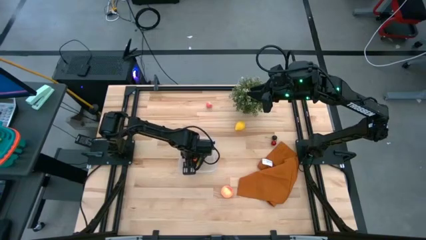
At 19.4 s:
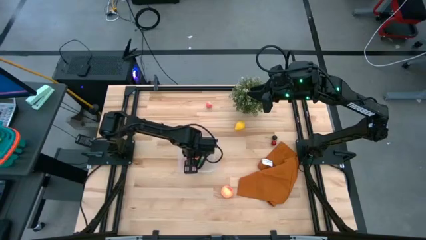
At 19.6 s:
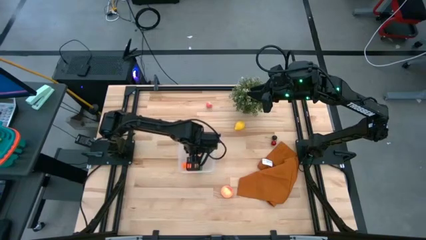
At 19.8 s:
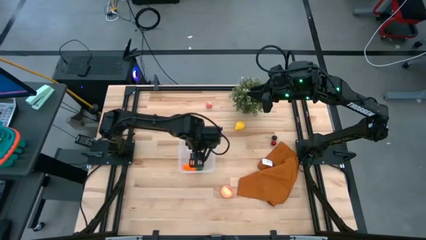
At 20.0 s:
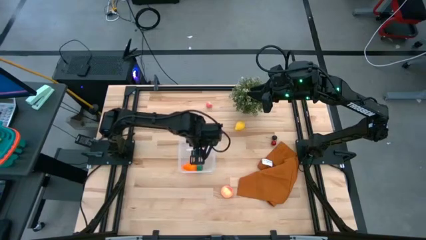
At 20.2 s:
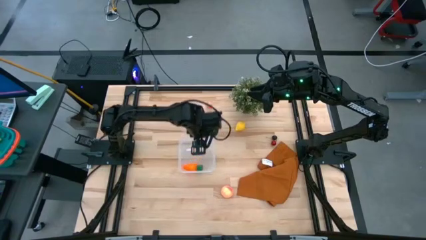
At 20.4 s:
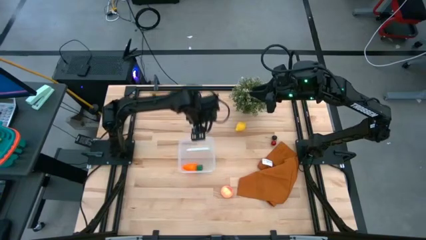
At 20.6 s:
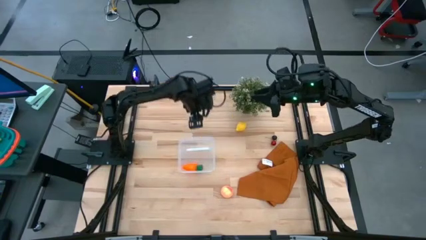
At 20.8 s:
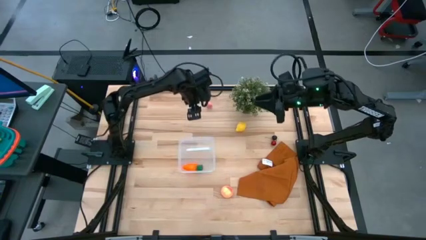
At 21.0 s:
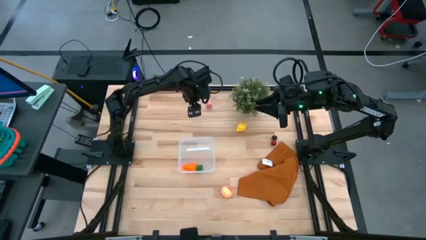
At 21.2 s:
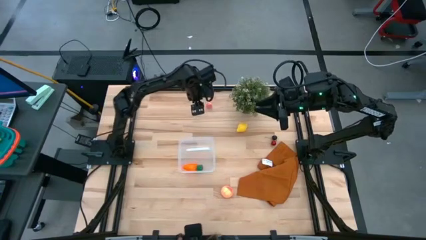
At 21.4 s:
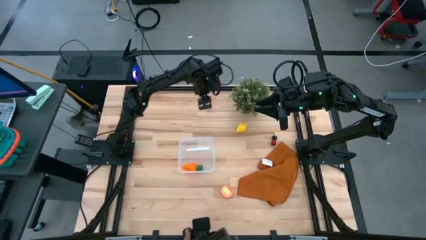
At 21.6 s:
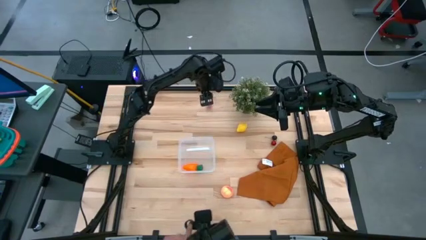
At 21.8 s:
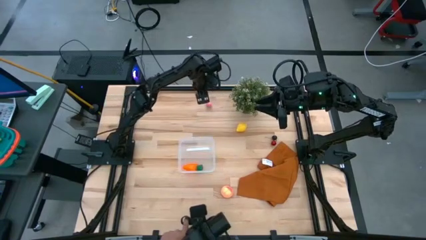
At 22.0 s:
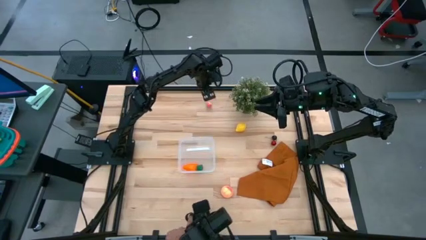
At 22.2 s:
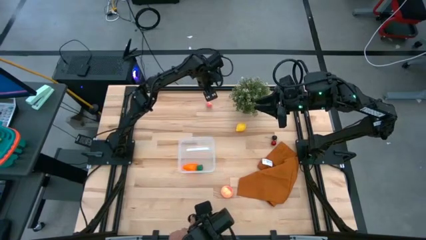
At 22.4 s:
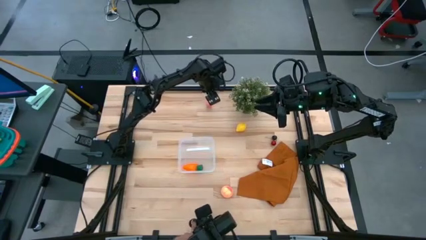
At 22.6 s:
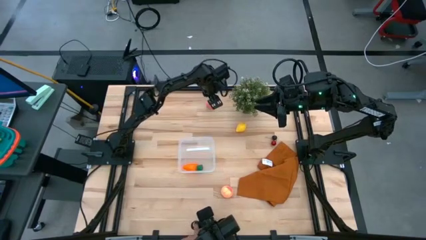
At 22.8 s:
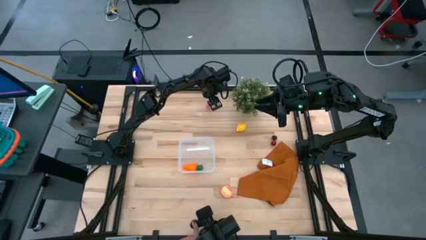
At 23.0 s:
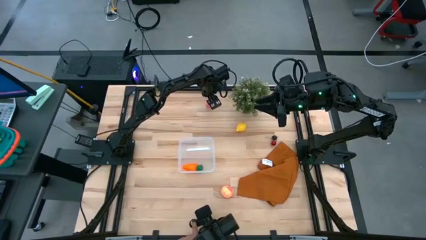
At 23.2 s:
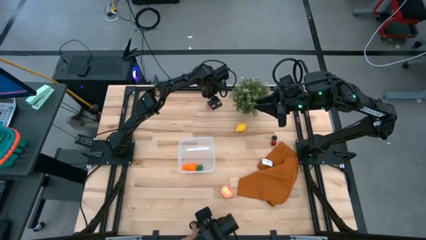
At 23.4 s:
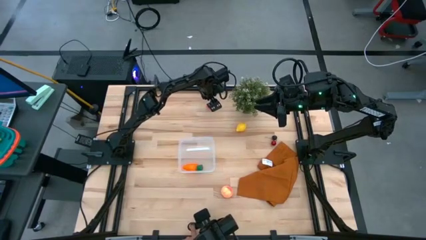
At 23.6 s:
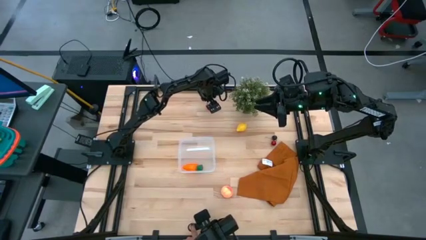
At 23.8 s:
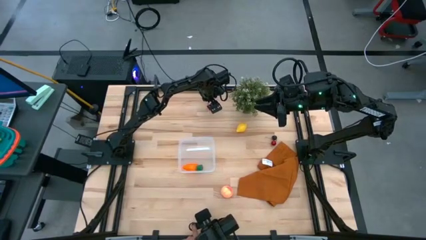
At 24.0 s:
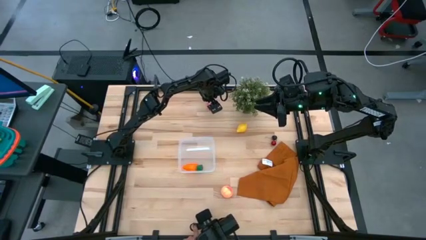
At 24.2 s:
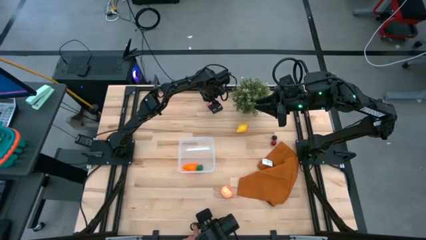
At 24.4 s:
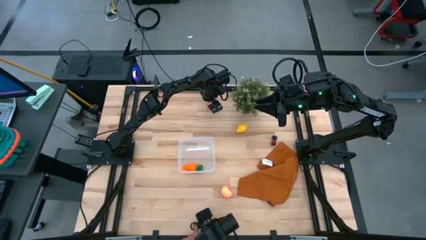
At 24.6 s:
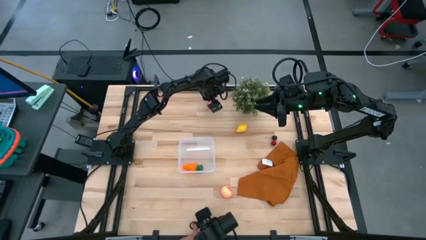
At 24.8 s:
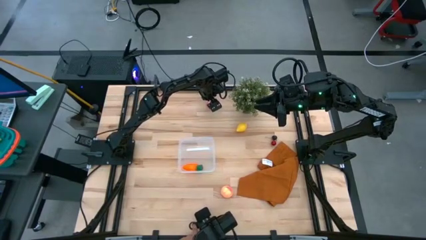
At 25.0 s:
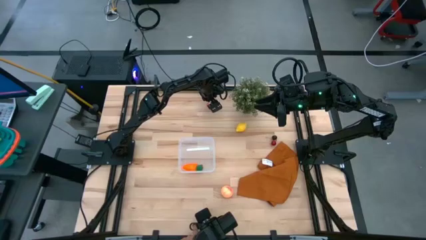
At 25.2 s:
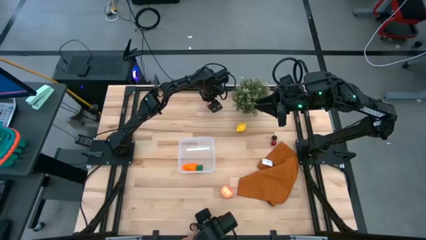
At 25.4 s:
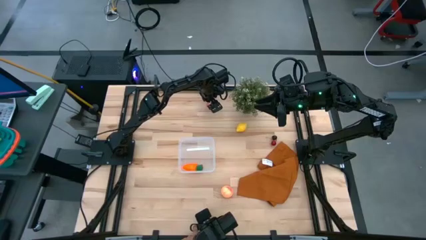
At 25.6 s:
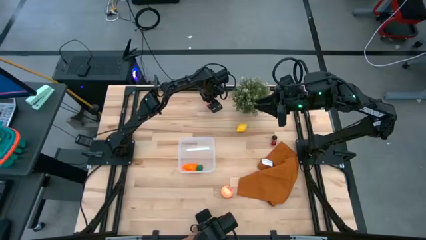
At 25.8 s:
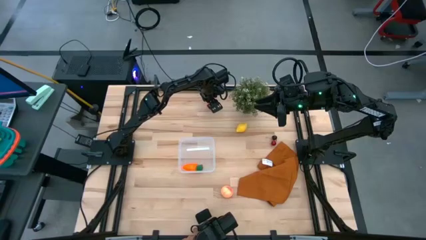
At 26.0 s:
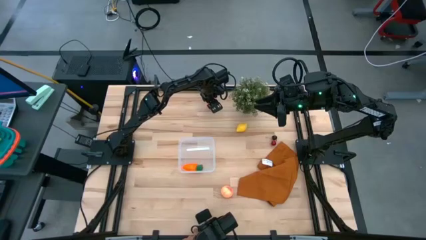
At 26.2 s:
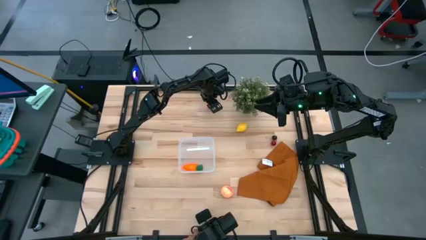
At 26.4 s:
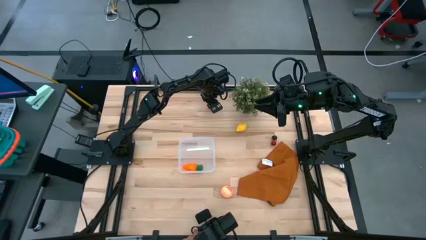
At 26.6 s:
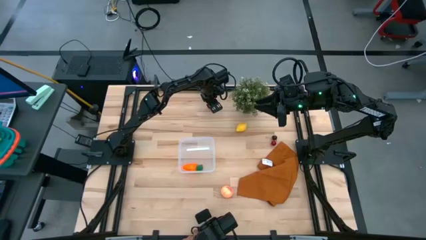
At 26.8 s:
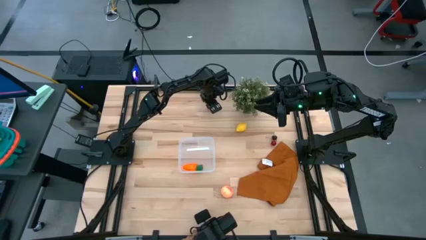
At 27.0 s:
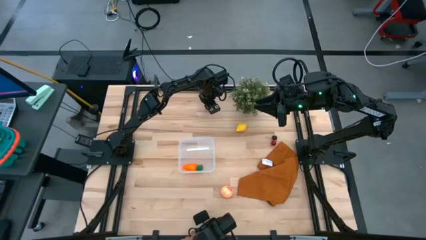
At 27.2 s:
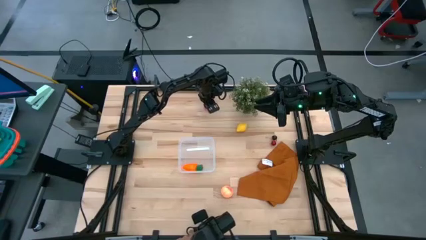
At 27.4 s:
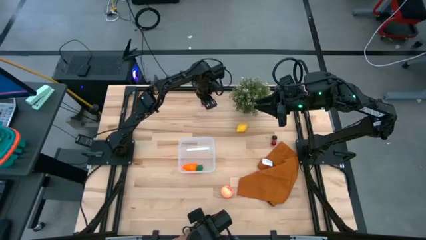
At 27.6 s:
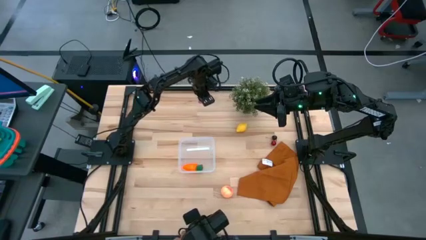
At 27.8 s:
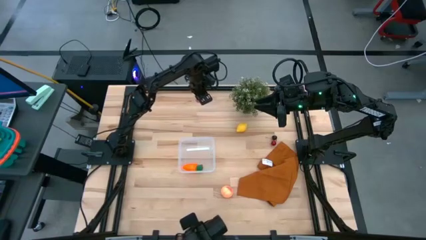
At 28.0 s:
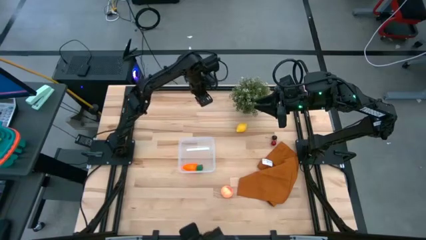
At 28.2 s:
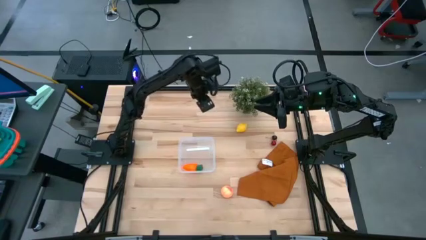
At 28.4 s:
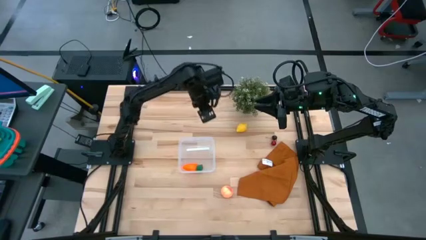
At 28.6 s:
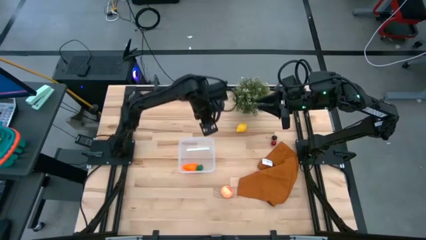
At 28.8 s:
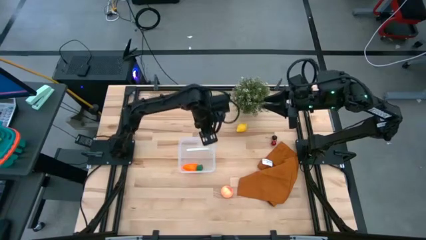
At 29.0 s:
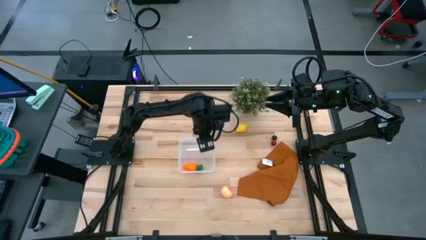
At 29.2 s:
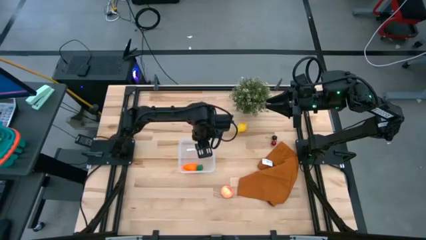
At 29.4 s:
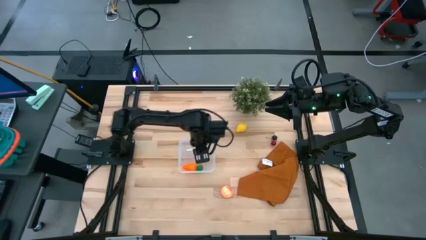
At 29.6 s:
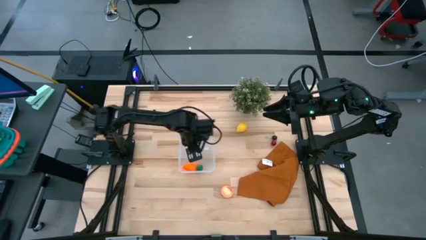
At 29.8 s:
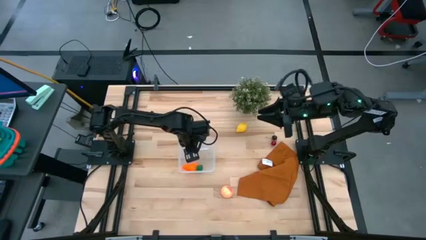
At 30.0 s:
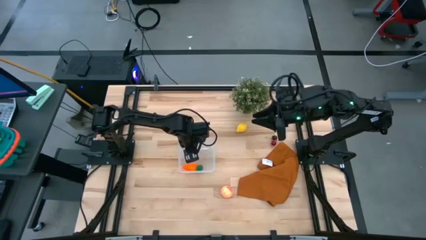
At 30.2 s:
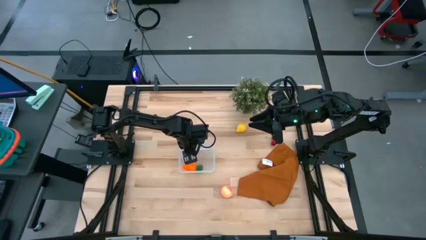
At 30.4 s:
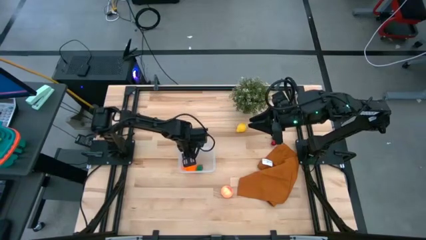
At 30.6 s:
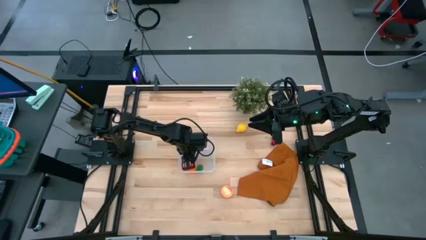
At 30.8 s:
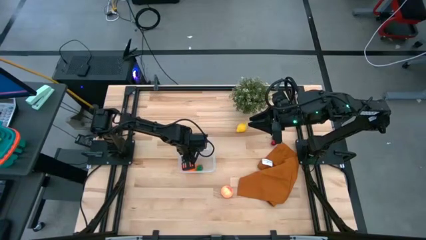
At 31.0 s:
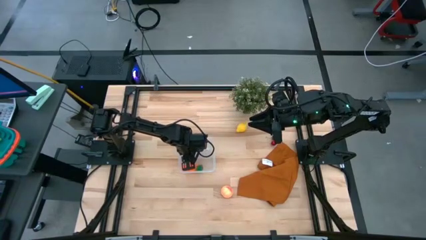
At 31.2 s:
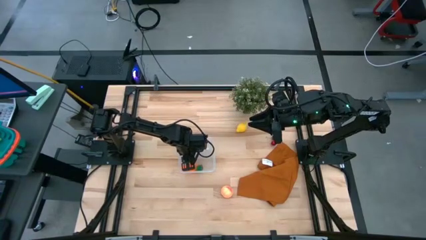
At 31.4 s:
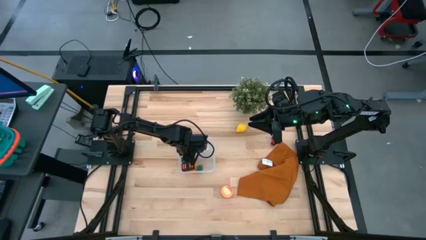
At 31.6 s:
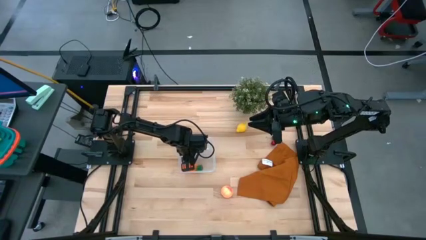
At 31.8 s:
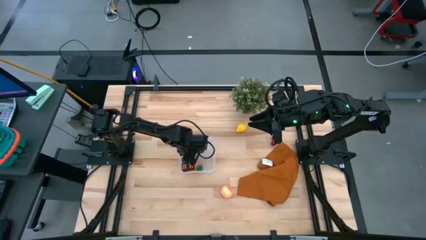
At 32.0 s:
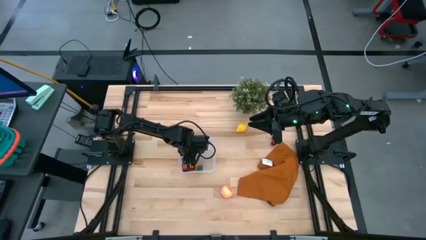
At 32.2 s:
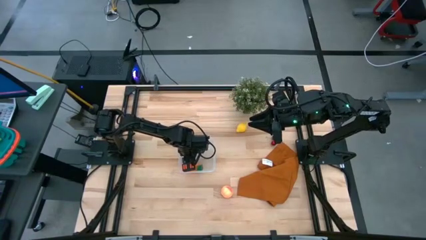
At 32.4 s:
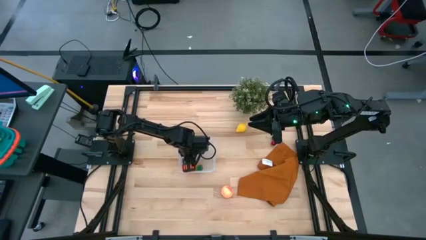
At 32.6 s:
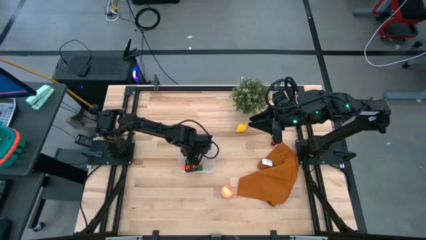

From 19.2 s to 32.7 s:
Task: Pick and placing Produce into tupperware
Put the pink peach into the transparent bin
